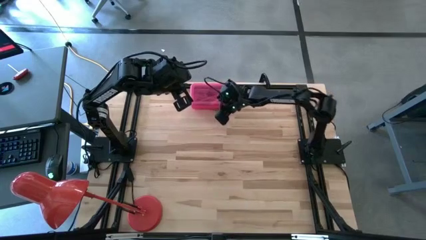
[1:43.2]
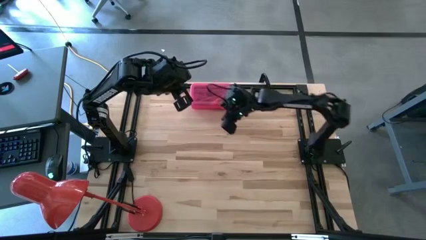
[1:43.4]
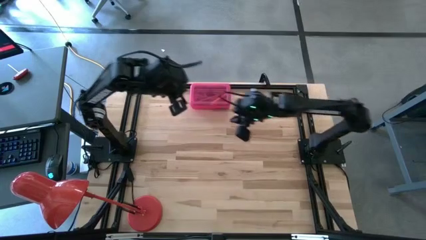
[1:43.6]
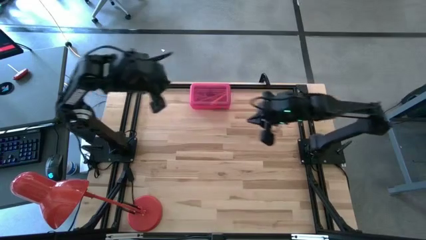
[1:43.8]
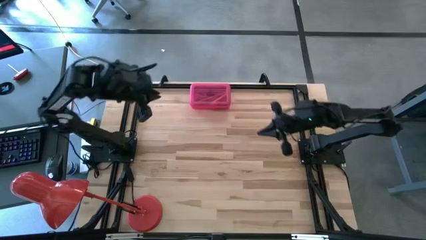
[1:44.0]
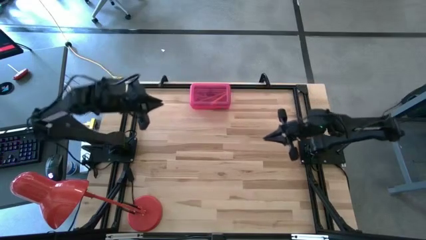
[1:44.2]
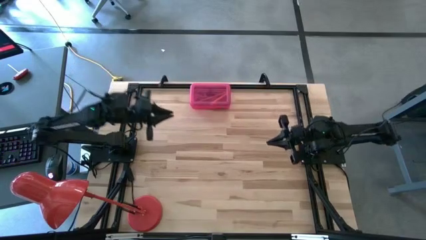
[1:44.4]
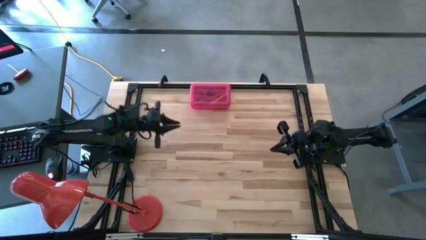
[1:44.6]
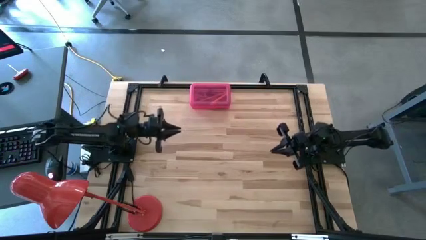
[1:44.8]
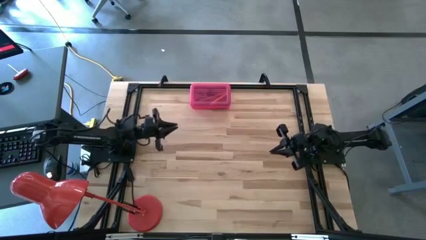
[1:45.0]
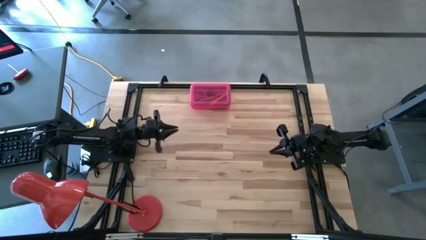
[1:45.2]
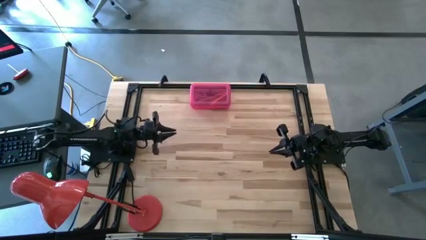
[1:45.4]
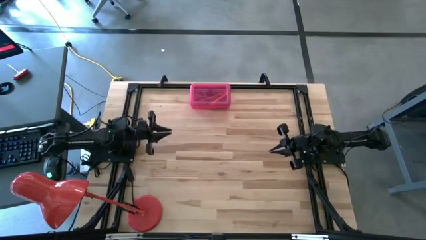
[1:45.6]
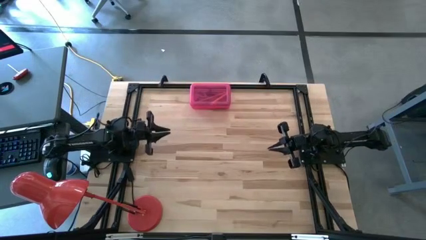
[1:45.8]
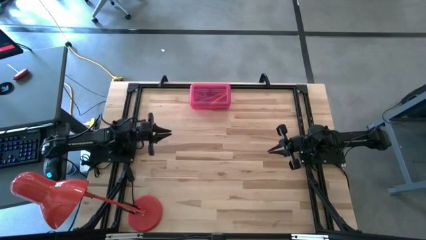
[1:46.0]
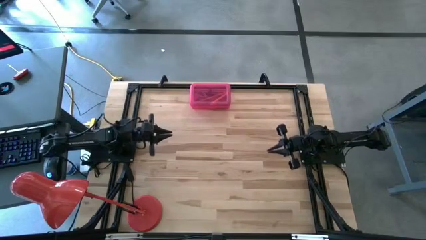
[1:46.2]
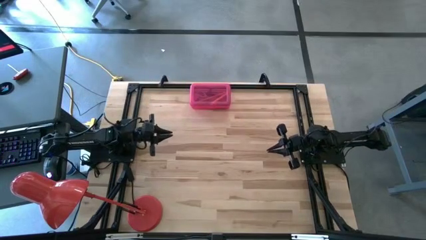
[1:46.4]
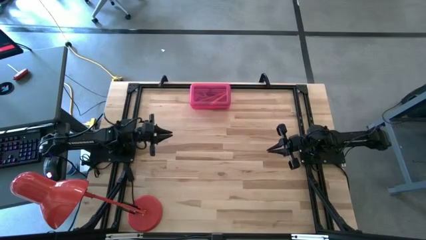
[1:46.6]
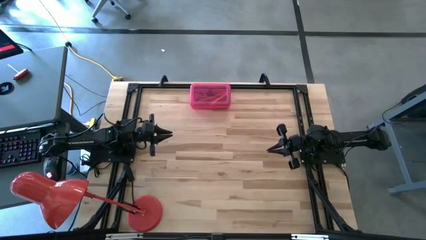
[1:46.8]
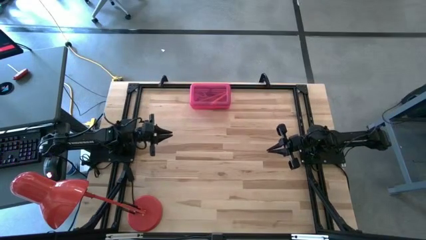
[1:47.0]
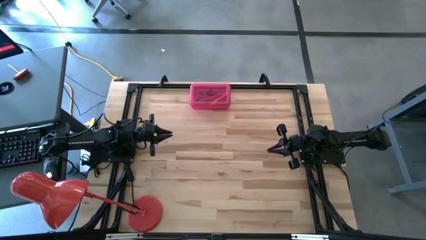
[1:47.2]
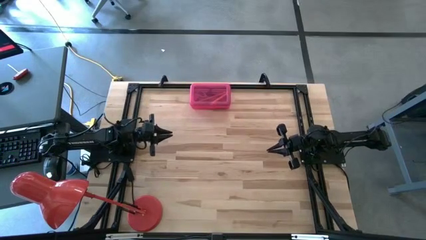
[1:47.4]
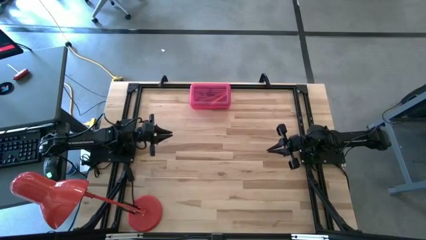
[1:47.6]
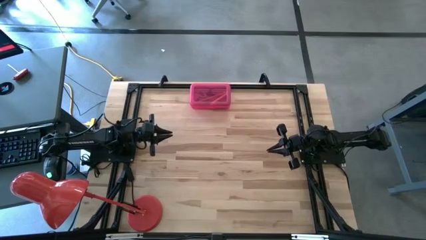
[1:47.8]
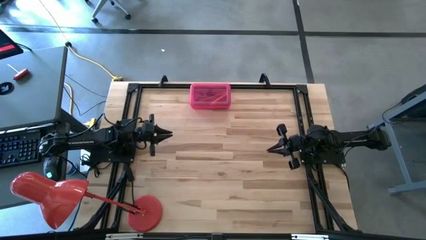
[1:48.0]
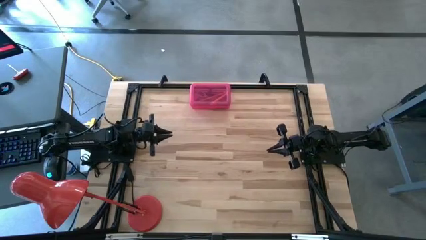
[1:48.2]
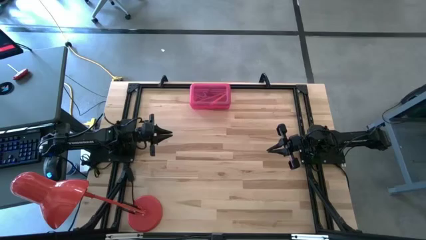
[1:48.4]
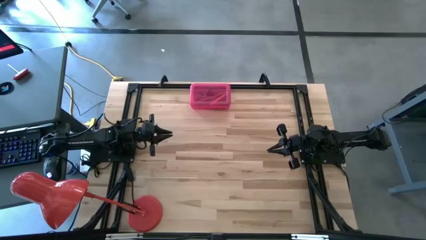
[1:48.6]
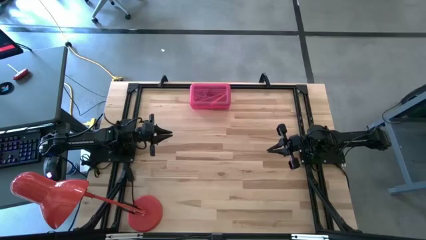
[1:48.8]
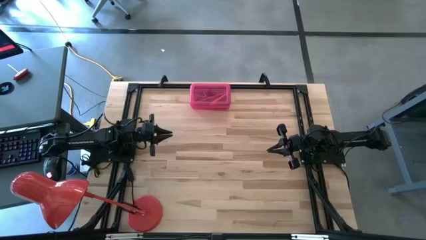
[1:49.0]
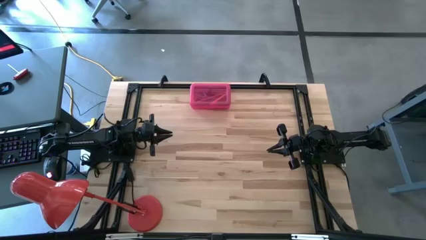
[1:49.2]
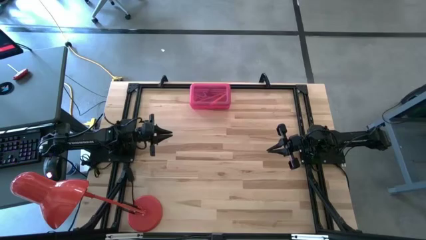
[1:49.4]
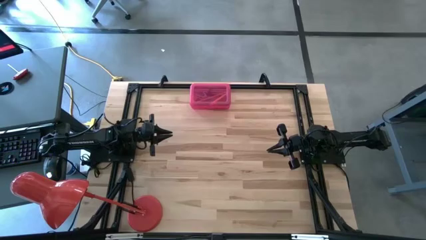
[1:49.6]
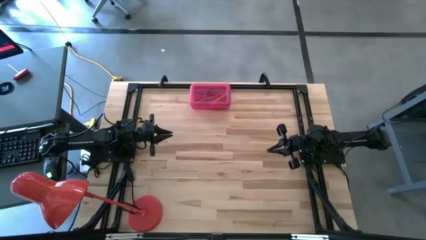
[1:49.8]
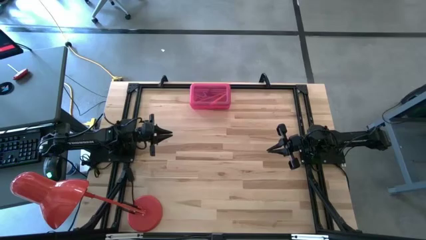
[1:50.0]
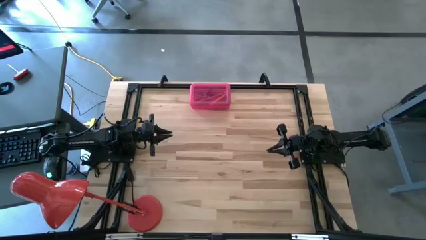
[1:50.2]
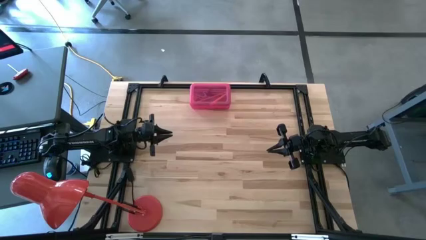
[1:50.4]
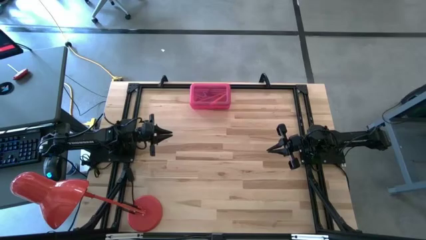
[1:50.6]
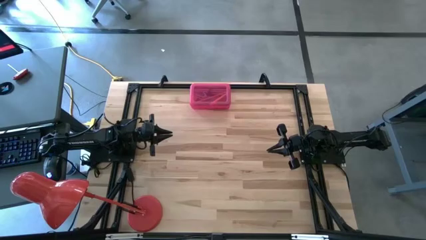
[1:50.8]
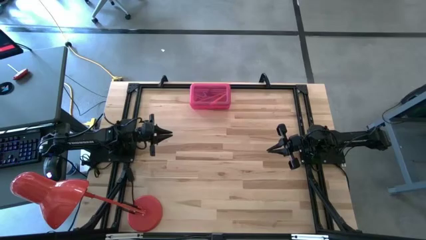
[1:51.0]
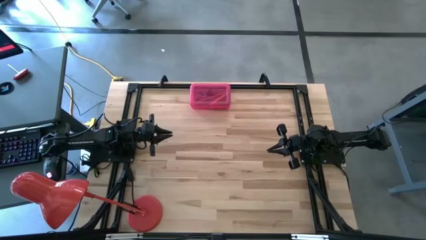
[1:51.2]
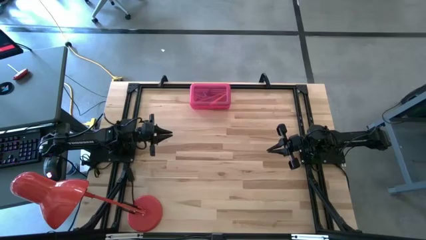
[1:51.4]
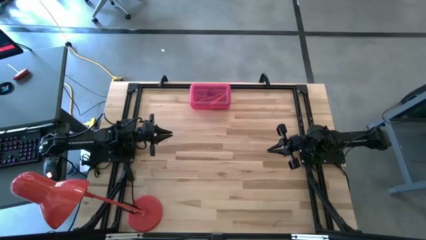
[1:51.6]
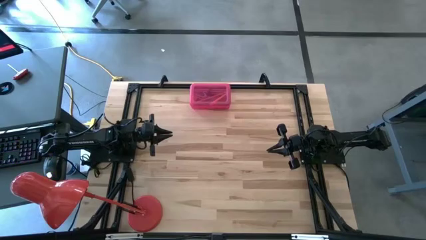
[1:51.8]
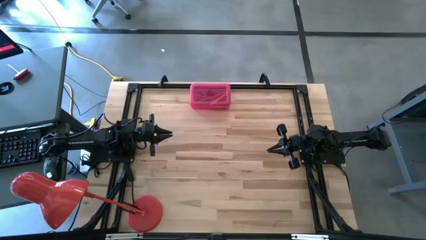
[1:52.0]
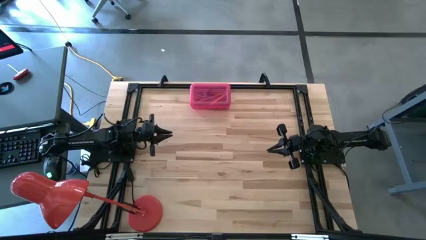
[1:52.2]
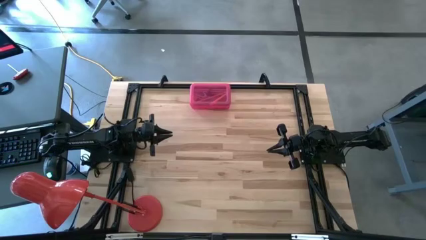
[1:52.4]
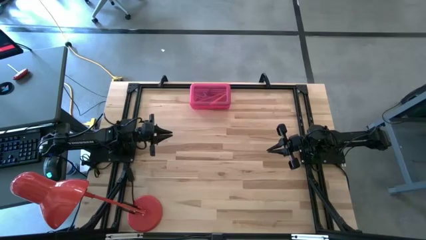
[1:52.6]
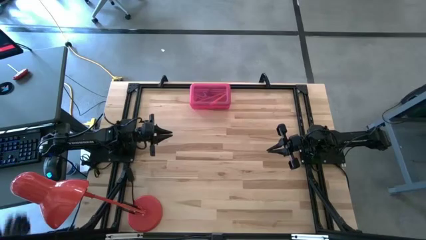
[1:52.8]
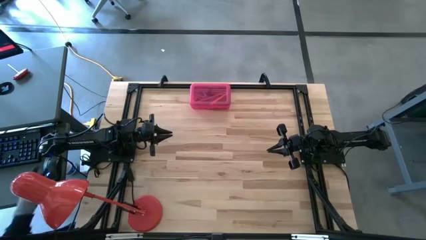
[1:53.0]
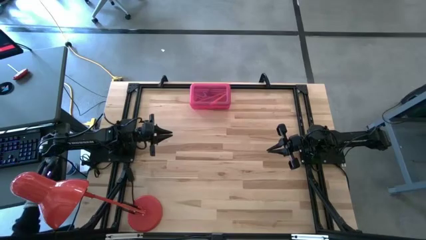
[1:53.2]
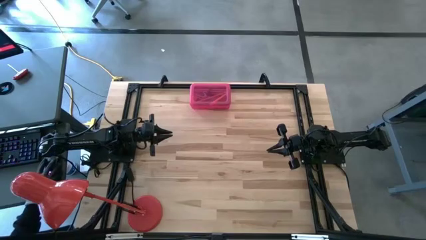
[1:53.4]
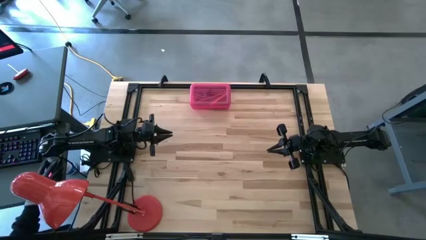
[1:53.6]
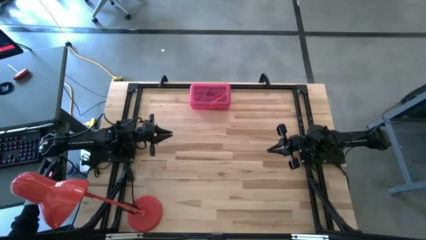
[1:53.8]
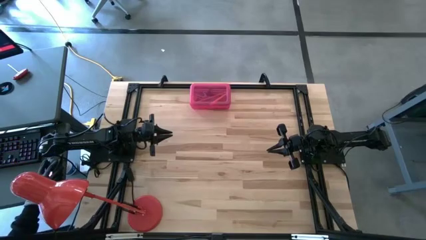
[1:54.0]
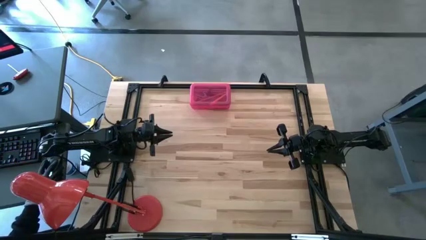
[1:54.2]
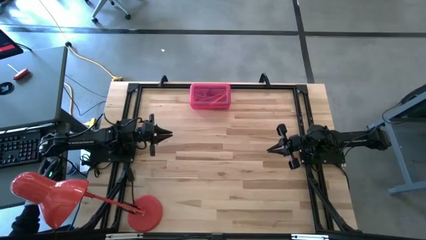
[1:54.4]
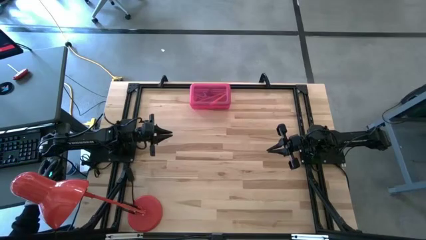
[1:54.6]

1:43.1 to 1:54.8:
Task: Pick & place school supplies into a supply box
Return to Home Position

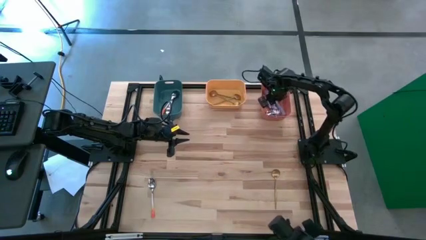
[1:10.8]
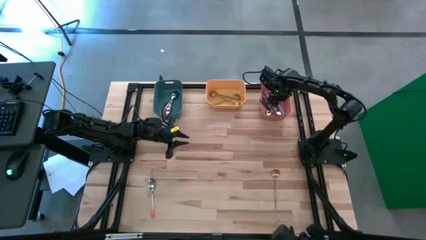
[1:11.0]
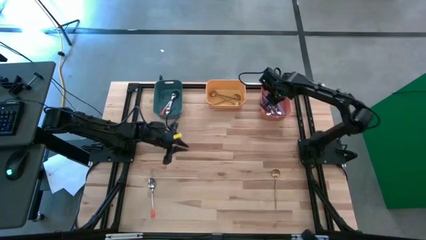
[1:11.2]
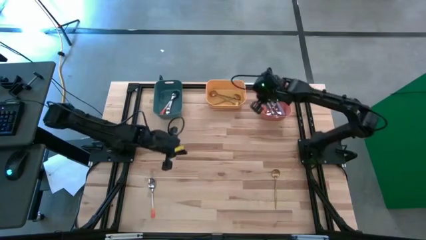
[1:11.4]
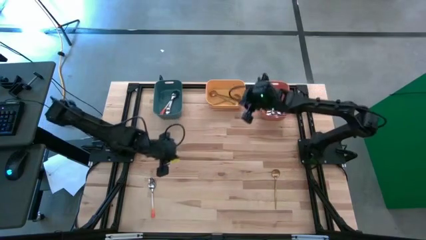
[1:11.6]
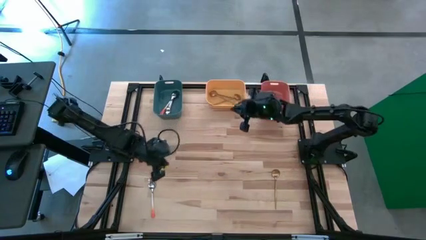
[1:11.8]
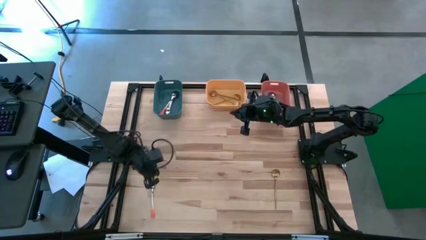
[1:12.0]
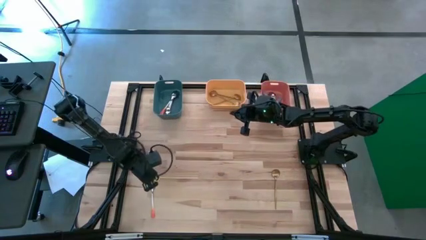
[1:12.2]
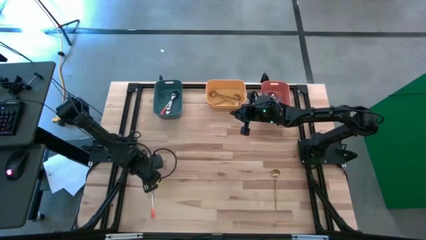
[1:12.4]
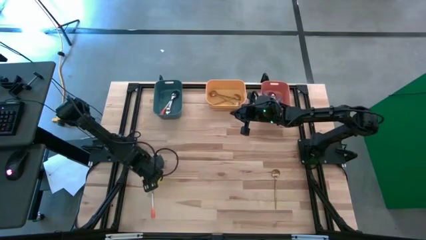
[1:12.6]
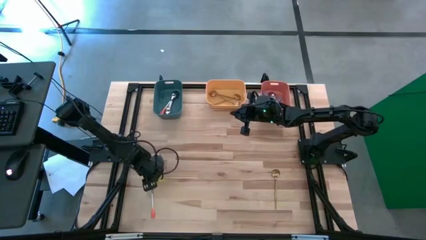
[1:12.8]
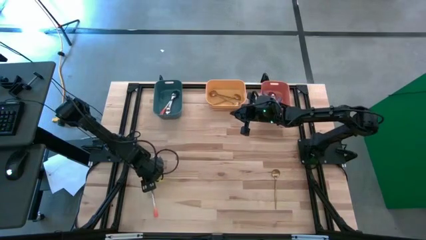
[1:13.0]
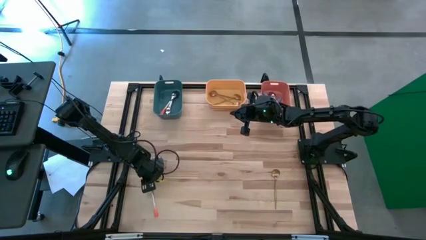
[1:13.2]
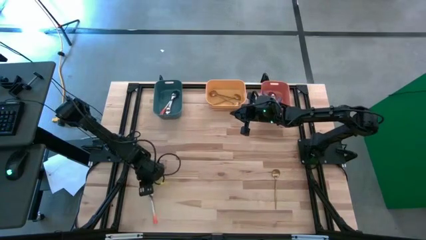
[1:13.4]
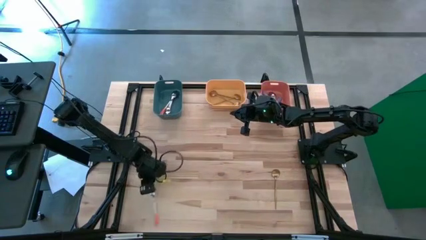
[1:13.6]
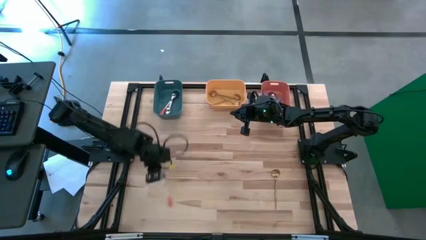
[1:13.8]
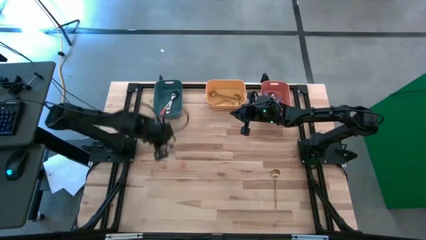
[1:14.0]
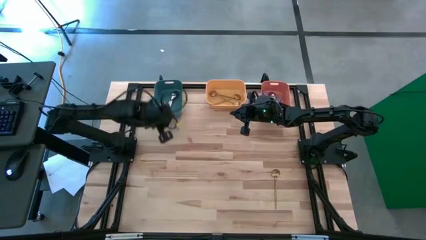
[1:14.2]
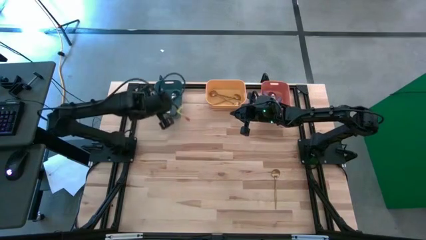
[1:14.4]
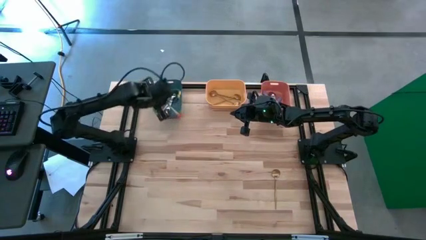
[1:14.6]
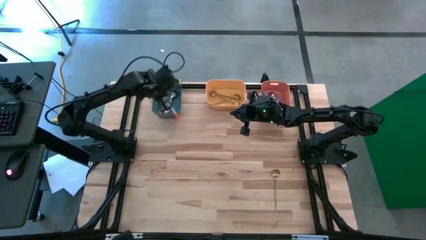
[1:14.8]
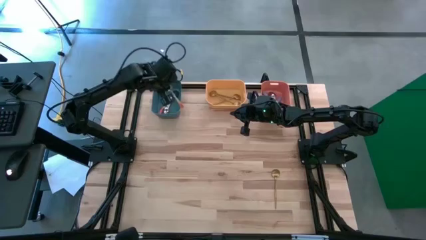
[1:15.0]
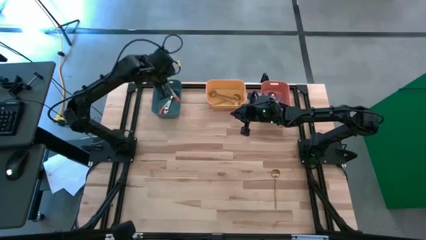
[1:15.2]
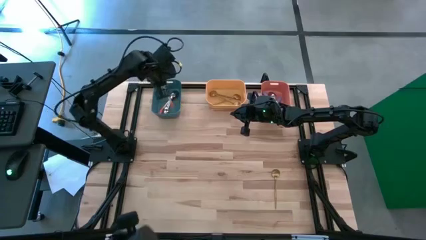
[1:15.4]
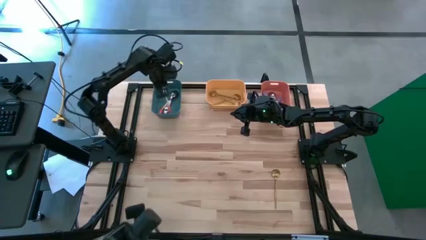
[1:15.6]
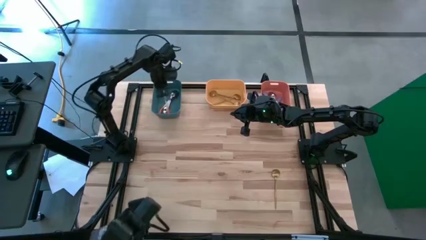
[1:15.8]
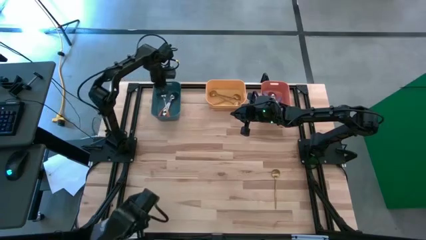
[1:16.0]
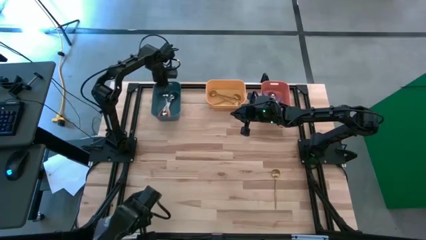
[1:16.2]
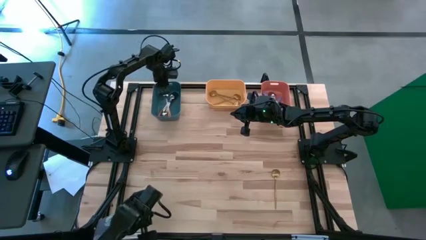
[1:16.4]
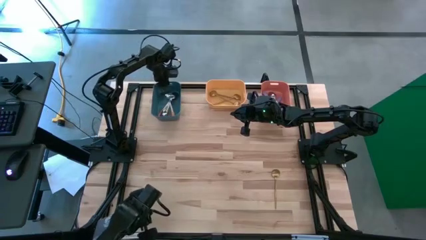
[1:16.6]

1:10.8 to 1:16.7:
Task: Sort silverware by color (type)
Put the orange spoon into the blue bin
